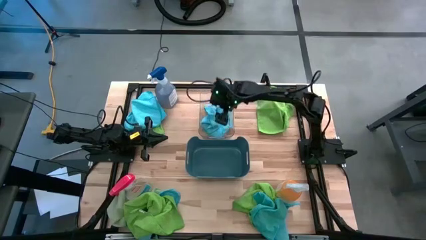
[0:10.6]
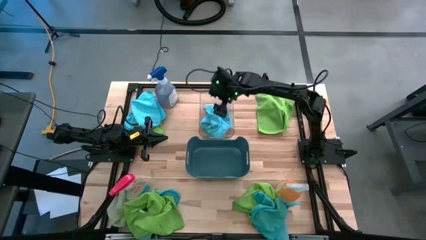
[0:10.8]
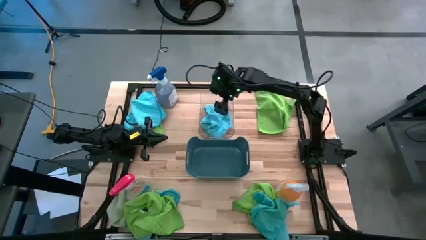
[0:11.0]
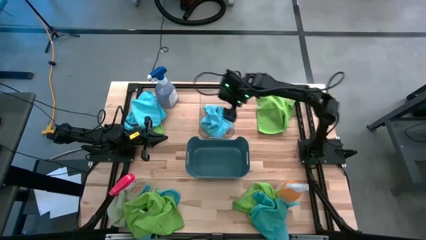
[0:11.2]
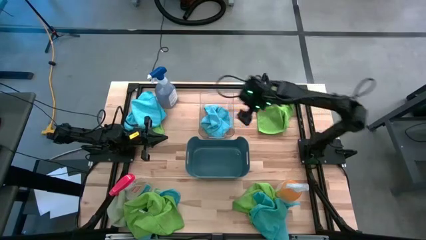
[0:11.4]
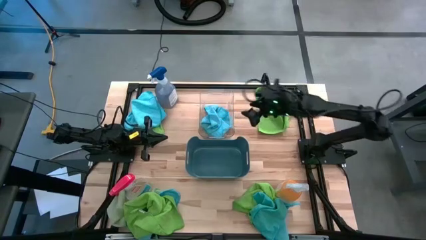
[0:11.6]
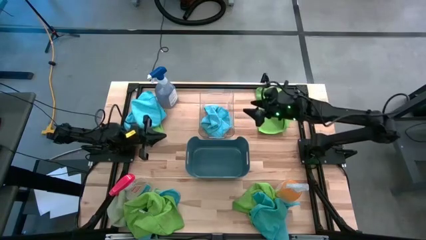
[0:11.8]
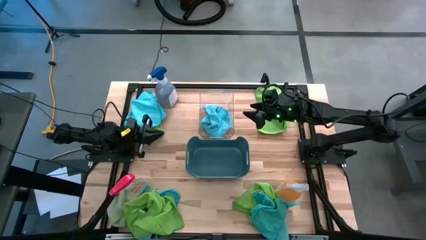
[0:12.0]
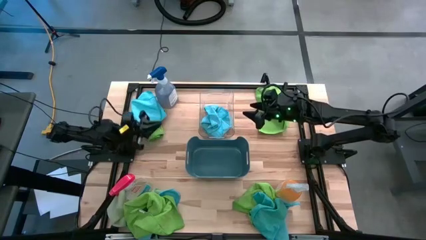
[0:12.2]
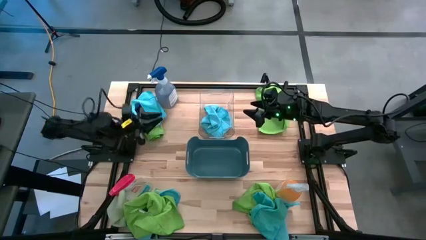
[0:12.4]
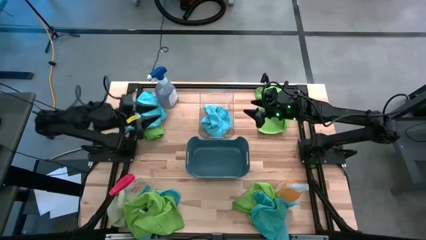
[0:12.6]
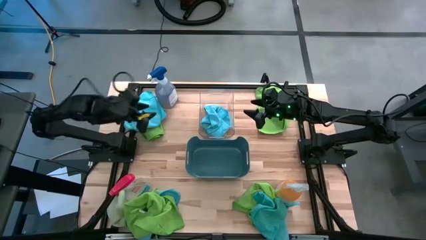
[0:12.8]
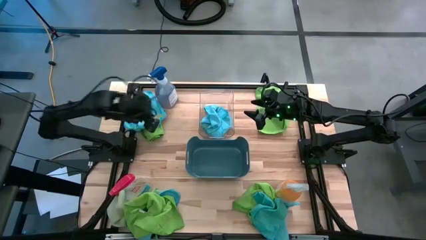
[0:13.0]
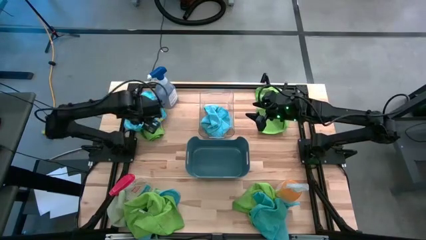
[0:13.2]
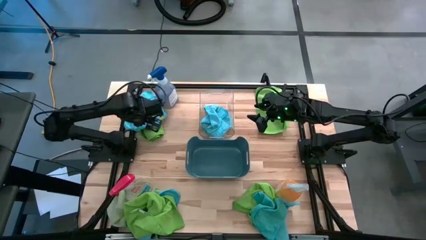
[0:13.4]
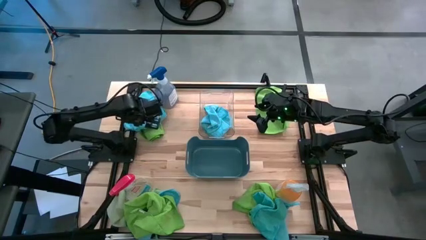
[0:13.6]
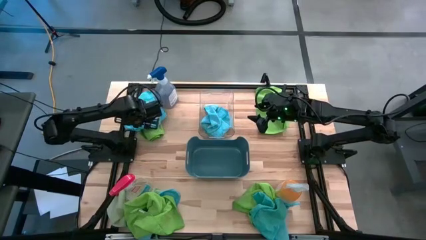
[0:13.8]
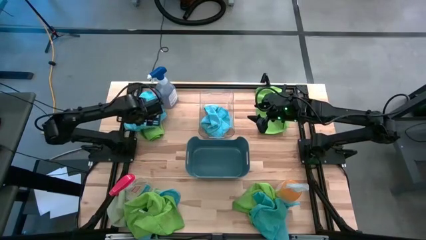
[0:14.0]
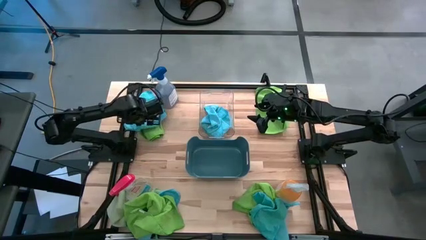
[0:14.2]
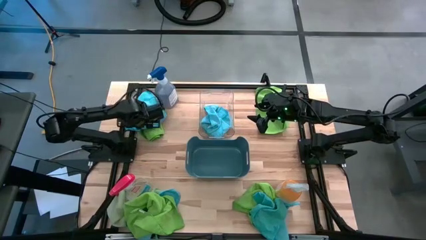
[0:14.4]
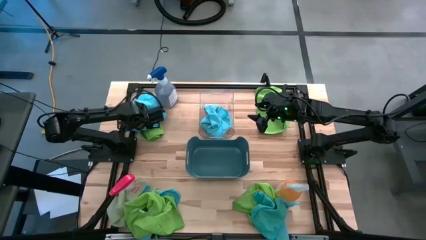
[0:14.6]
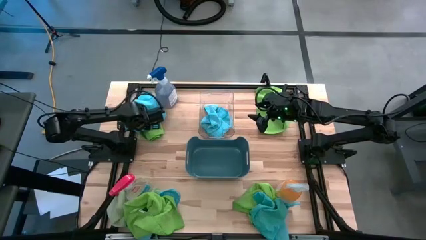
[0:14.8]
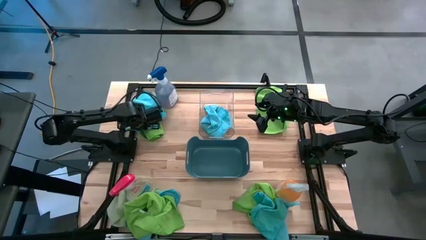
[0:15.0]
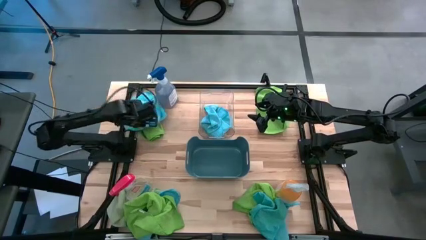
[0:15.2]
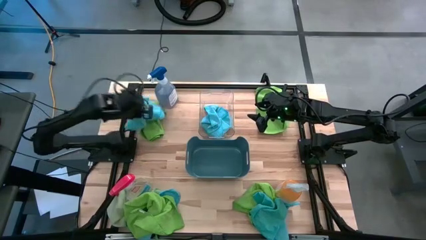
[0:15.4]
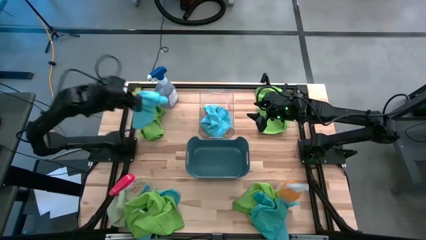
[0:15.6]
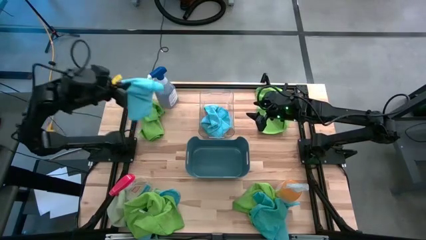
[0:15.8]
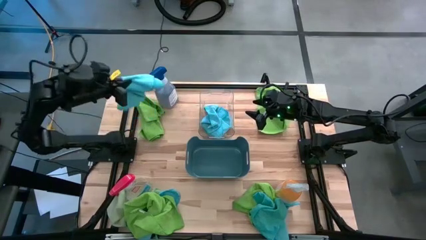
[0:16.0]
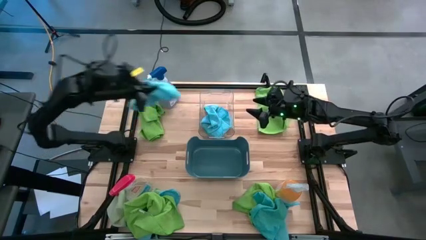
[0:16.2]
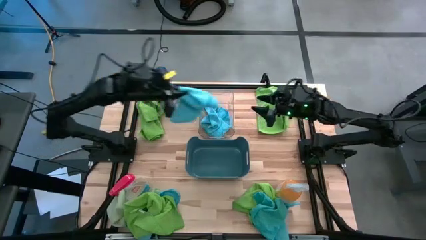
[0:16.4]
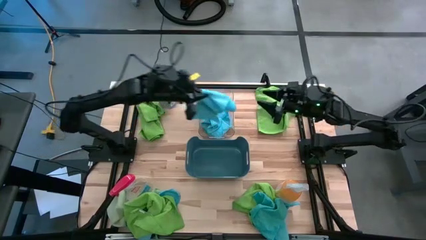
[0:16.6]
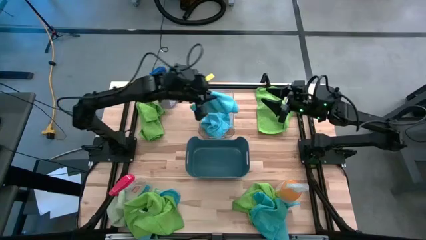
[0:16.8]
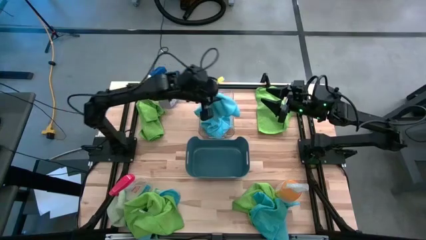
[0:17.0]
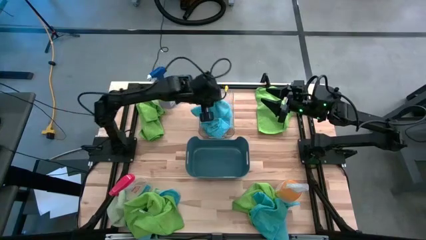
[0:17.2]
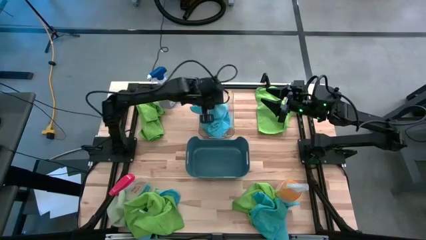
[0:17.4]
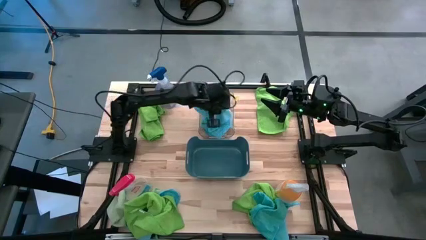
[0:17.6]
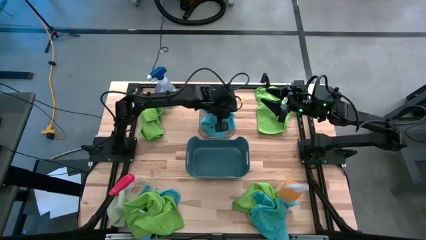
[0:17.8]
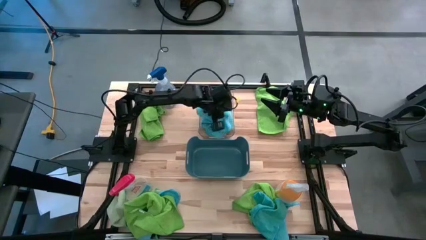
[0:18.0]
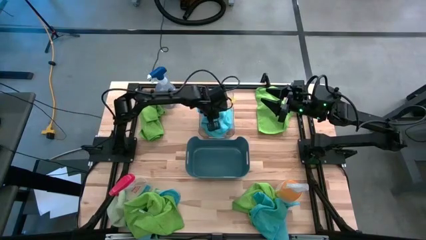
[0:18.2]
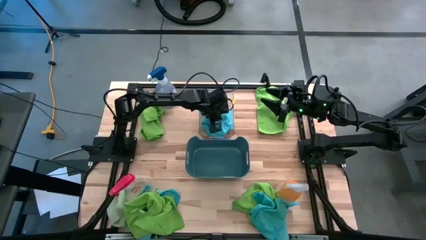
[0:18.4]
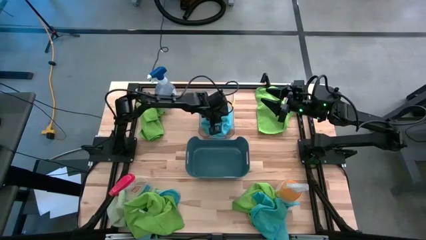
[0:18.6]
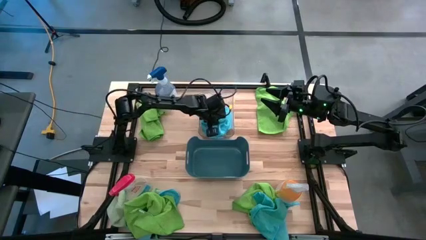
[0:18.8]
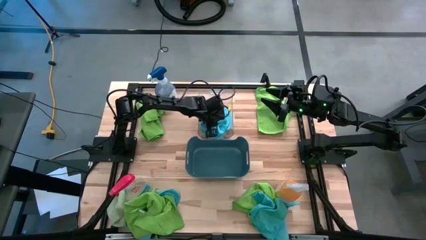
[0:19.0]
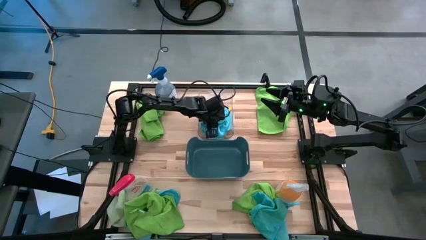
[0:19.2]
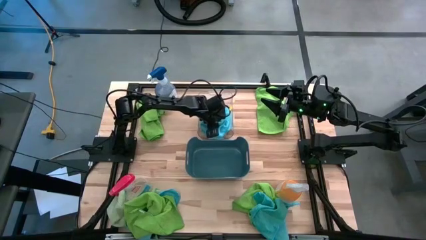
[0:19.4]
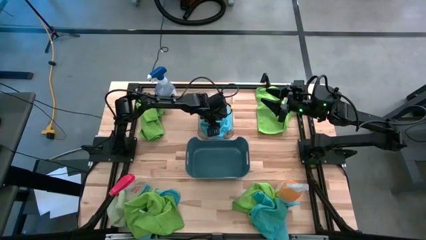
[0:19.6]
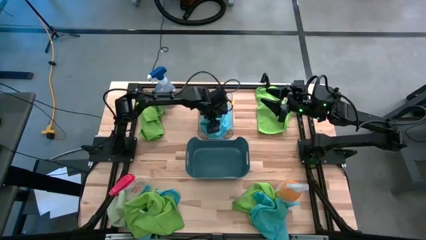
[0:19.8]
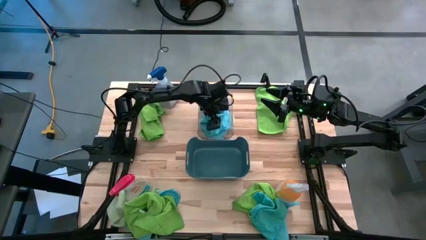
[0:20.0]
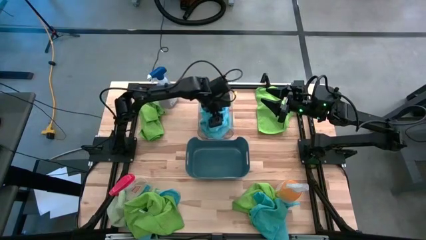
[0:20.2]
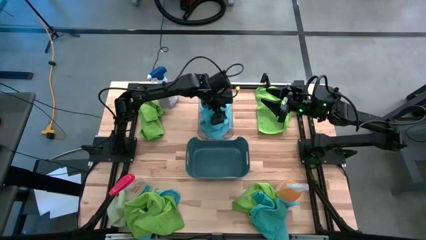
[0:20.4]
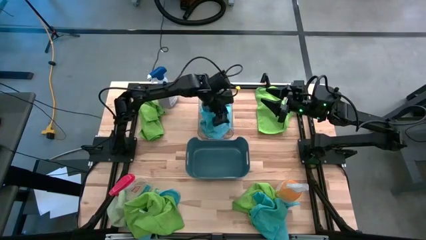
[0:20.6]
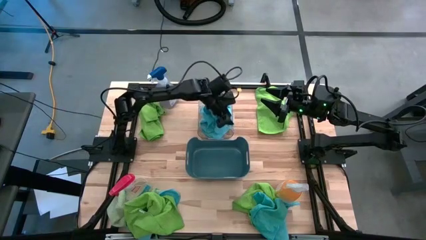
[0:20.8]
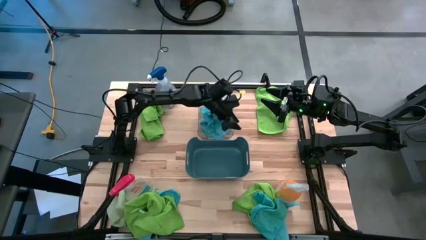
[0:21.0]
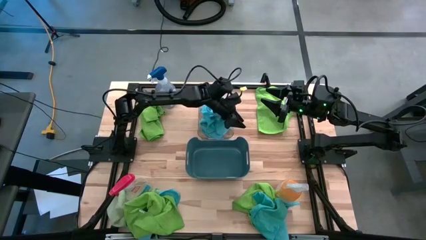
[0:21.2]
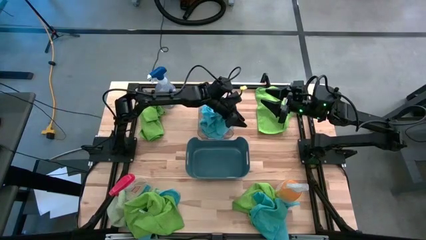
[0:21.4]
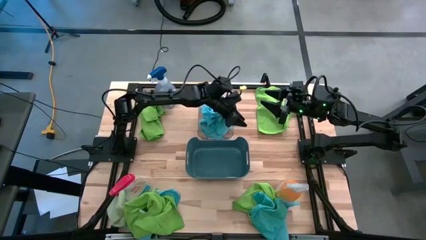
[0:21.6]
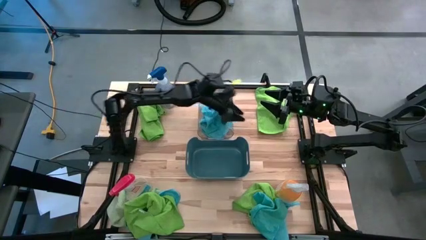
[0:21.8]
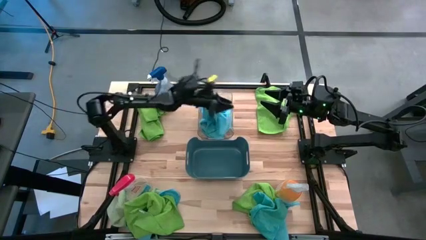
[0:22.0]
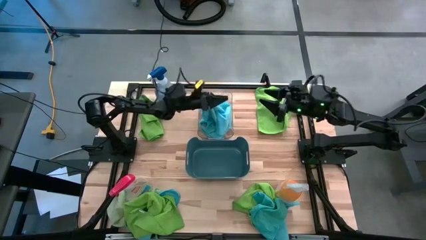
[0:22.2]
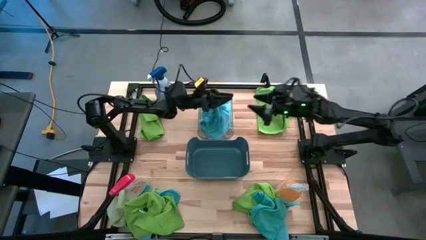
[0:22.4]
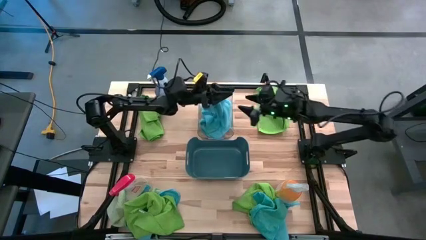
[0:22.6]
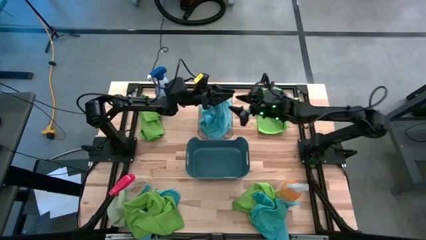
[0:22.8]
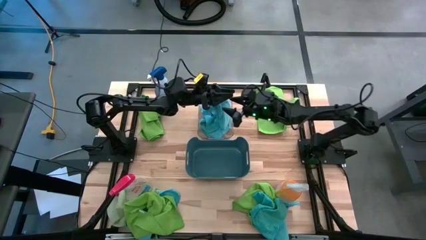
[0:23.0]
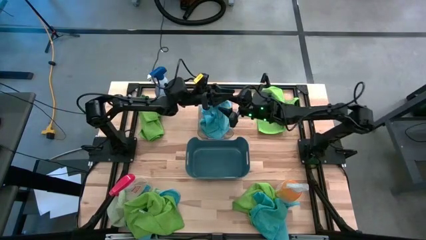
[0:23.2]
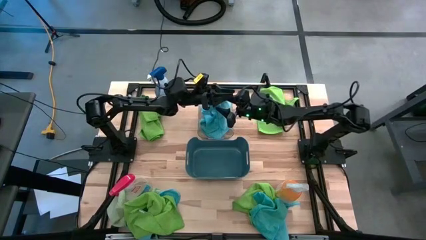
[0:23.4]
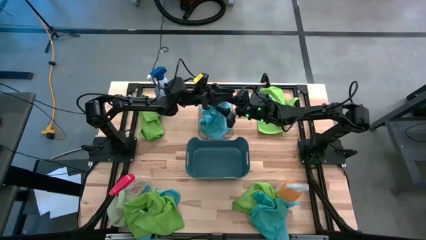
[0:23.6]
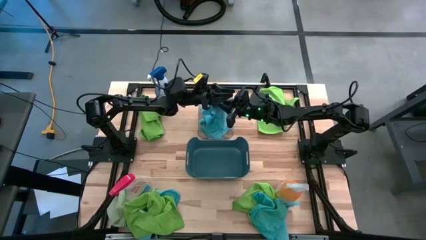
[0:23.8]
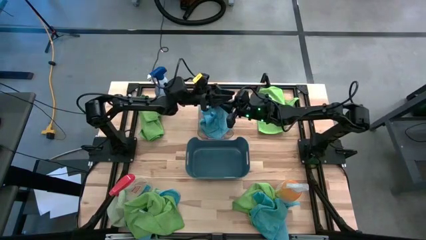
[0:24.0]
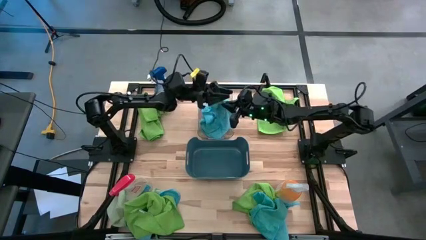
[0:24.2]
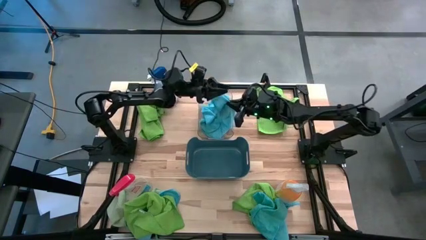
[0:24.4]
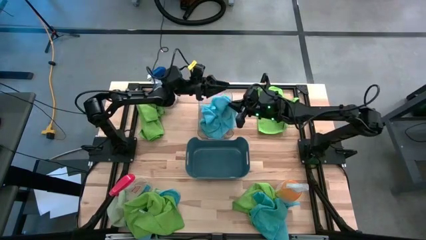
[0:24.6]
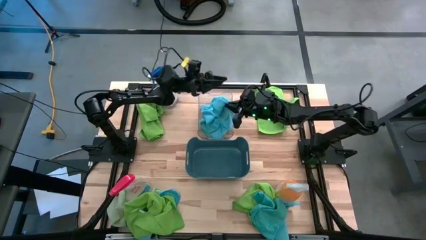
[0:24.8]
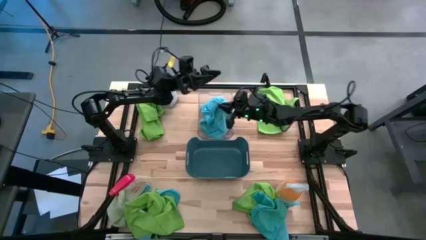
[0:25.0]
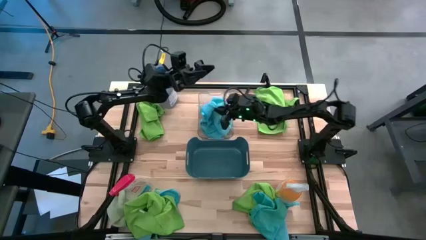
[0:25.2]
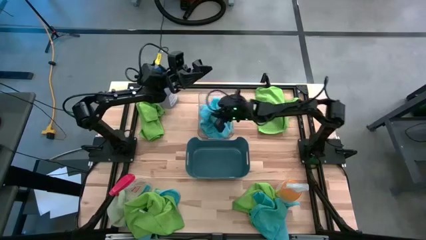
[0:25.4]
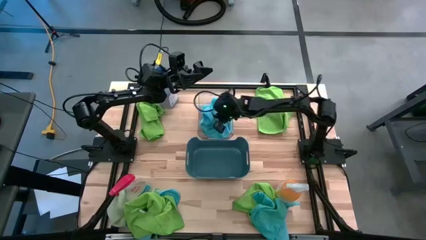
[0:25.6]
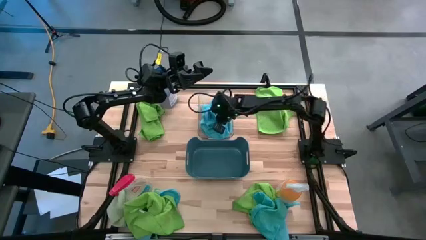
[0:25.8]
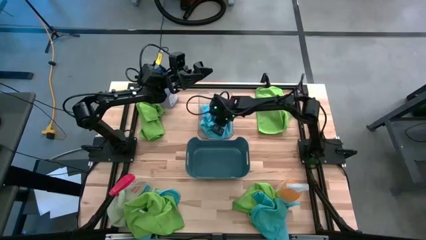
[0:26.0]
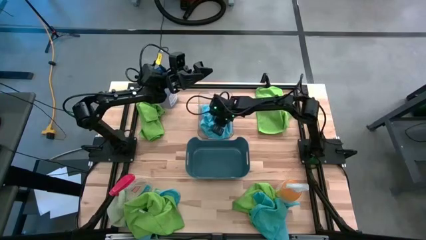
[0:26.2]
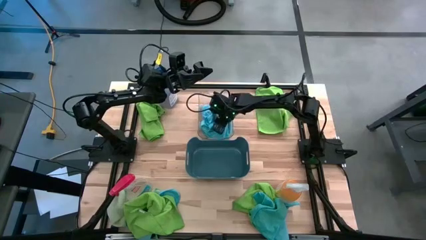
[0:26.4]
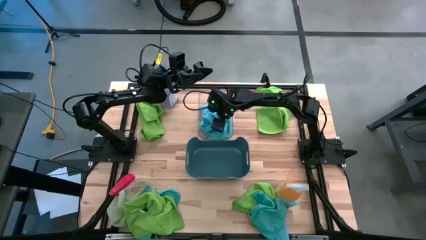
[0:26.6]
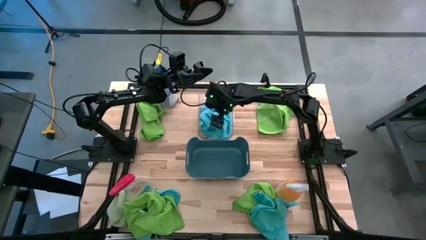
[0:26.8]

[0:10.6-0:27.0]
Task: Sort microfiber towel by color & place in baskets
Put the blue microfiber towel into the transparent bin
